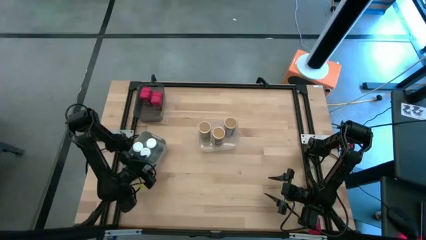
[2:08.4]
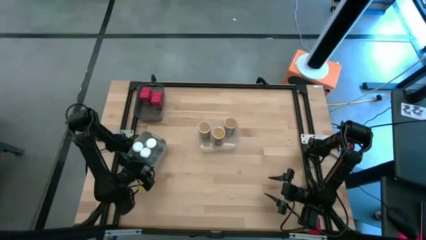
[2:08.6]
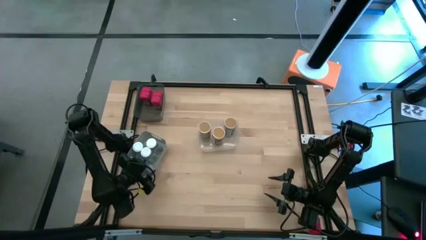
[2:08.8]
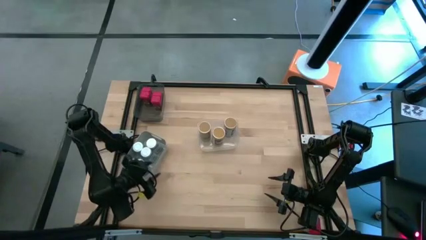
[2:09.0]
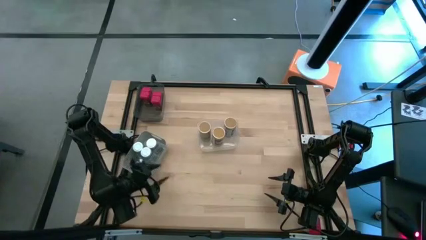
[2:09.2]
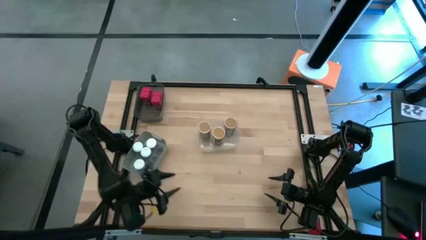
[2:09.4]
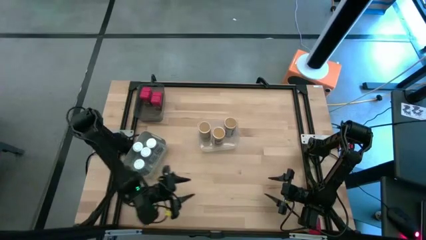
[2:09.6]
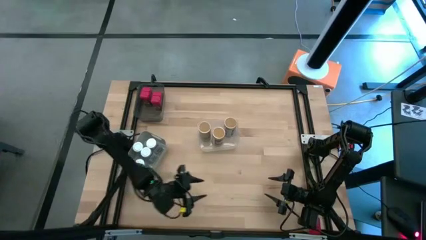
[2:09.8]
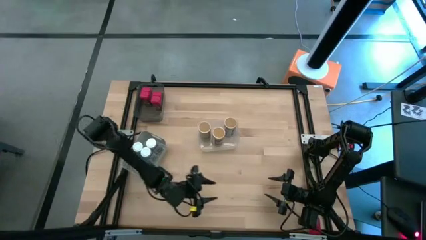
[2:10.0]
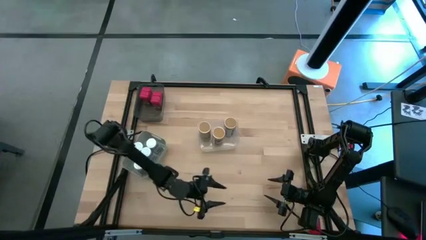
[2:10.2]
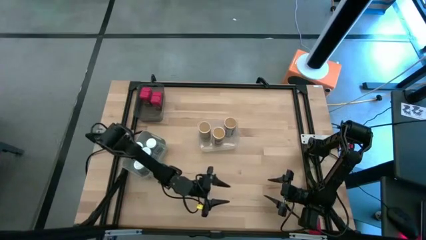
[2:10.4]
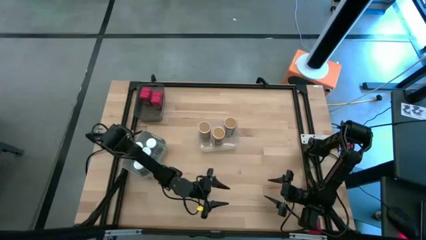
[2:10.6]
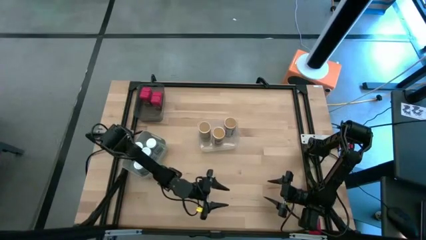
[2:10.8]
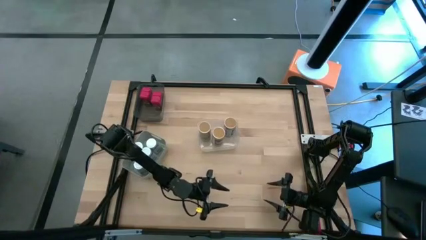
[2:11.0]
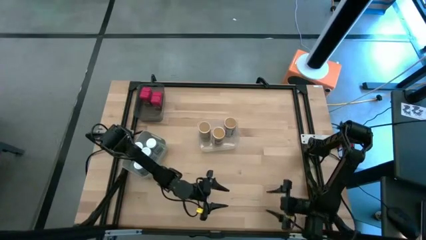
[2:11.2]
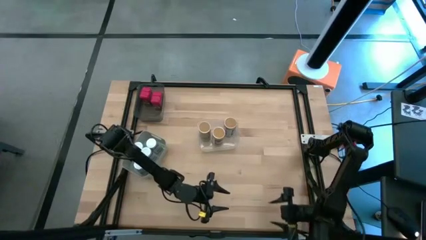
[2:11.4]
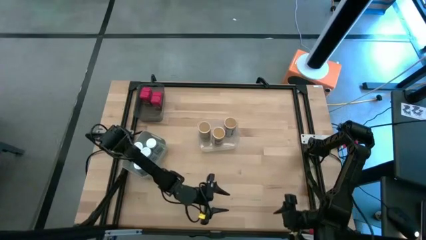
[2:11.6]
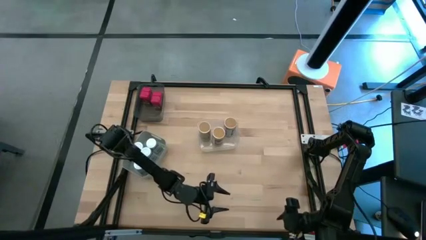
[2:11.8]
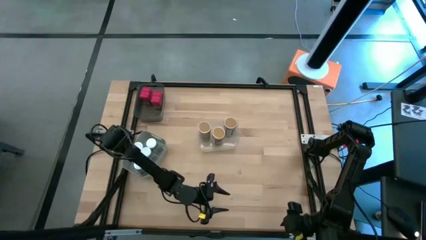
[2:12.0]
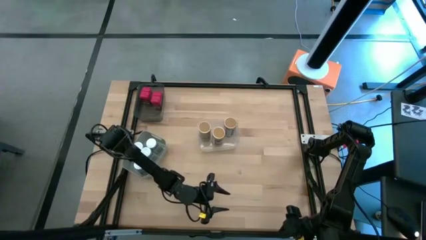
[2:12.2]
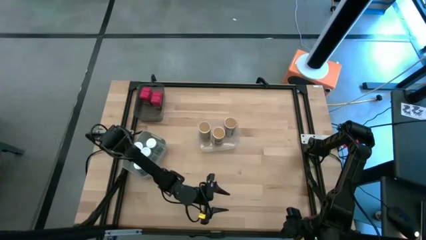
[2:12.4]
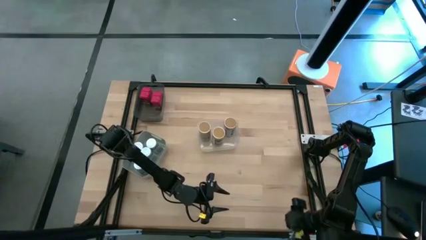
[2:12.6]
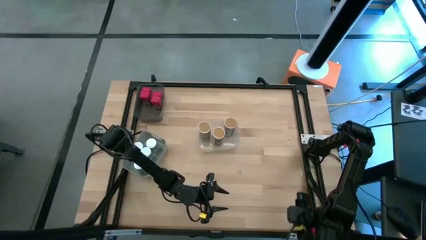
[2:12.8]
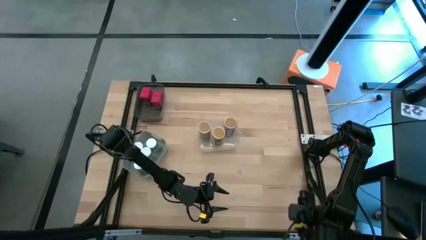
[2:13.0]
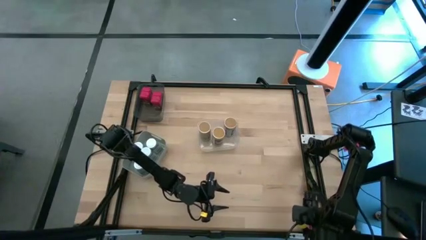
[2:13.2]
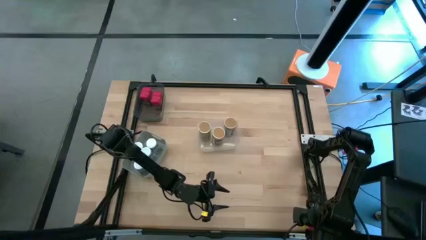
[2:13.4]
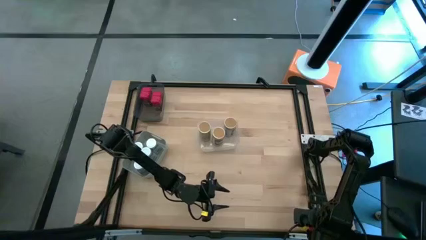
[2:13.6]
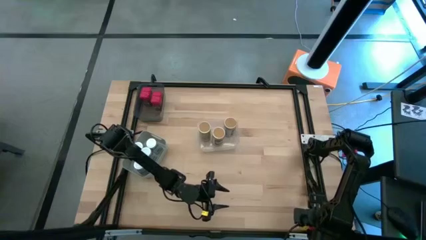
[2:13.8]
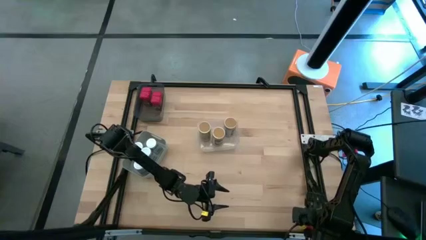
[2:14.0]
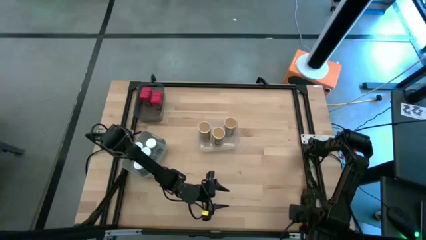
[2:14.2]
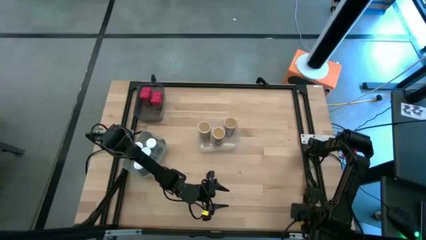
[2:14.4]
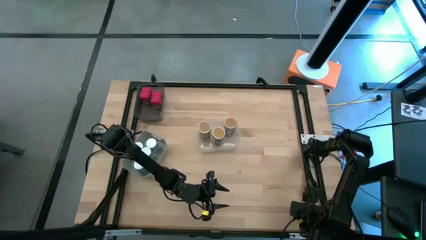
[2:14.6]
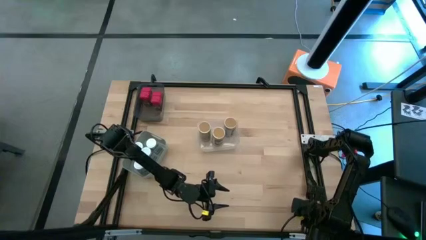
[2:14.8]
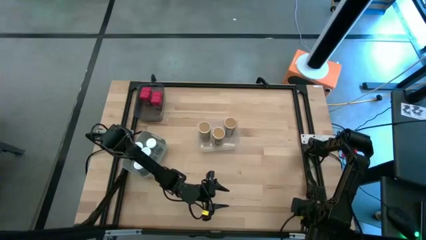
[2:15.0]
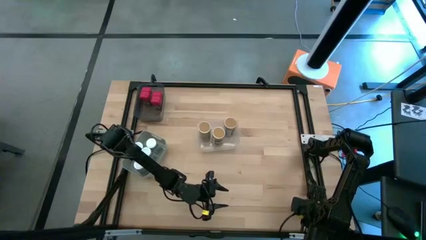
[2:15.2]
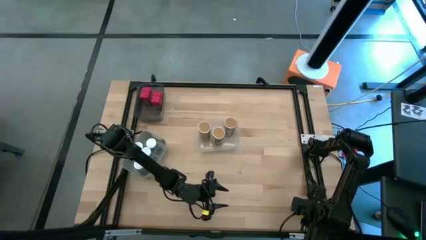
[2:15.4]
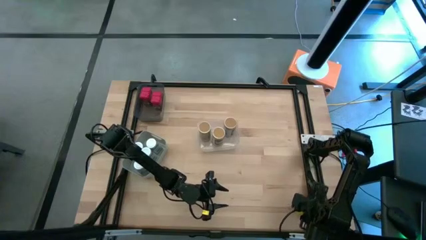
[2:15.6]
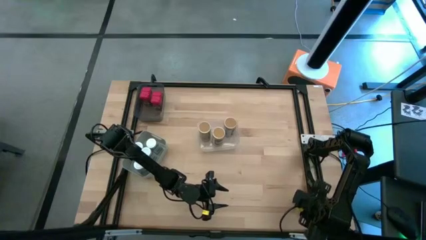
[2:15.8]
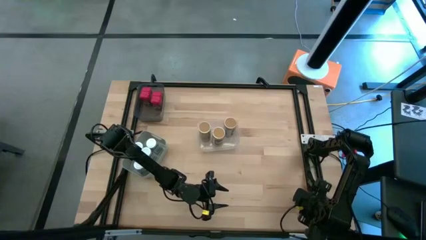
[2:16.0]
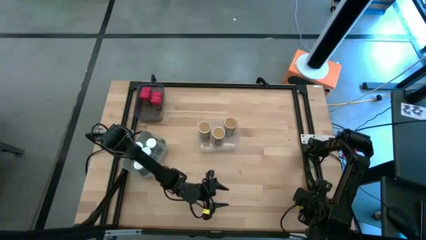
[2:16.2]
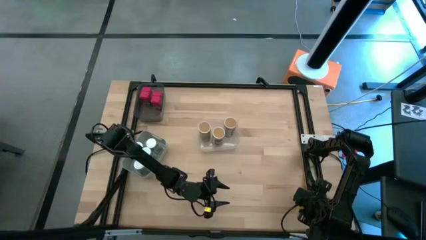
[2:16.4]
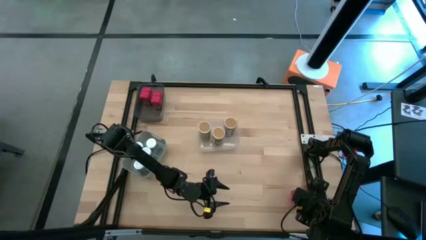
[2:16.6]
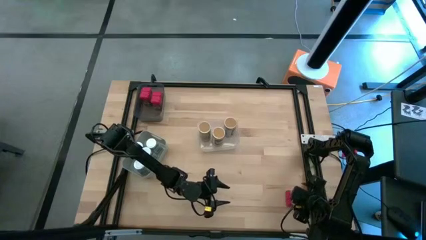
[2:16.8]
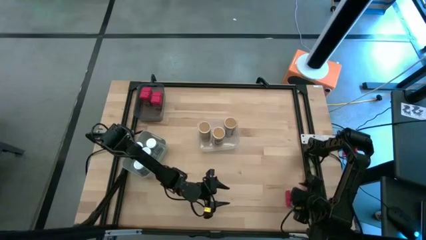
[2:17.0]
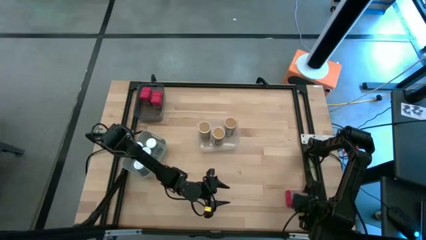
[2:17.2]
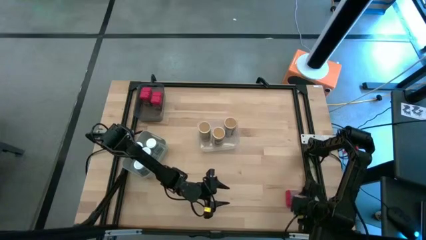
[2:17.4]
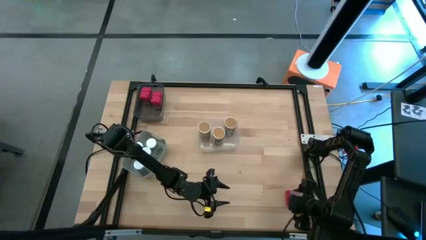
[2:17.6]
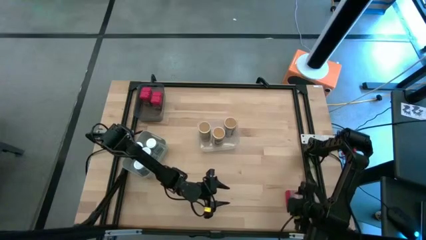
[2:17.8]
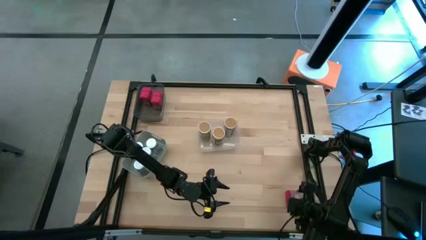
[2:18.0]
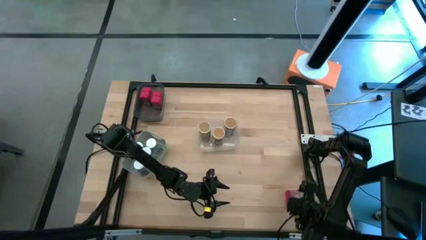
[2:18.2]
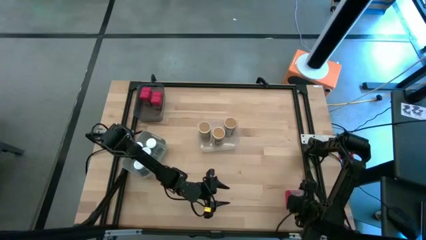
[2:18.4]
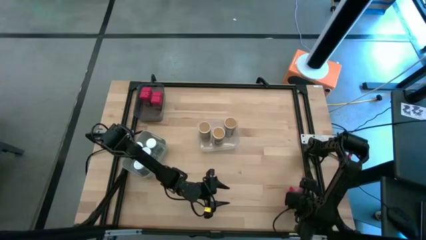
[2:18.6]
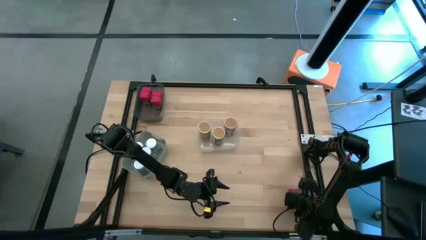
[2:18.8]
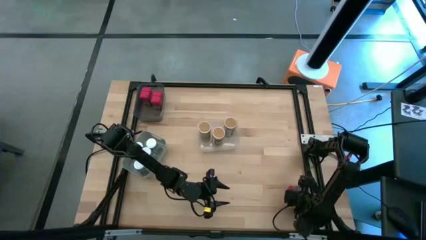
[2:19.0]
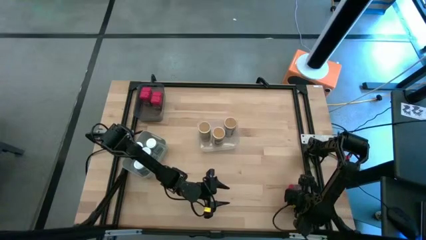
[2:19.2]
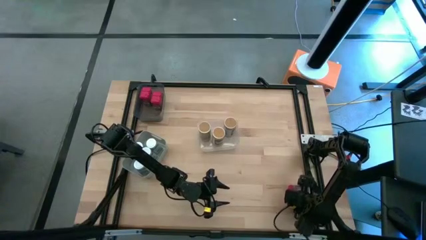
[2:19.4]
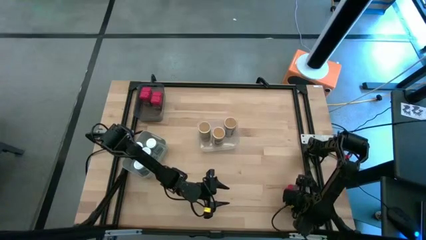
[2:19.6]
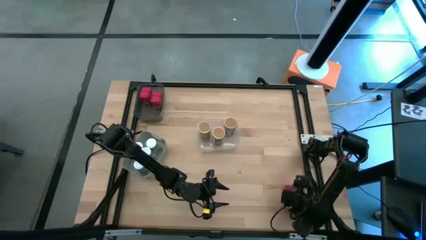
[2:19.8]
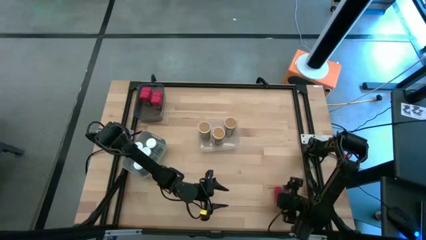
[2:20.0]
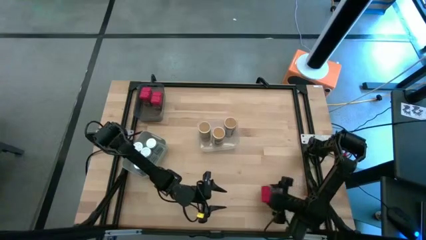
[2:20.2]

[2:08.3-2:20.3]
Task: Sort spices by type
Put the red seasoning can into the black bin

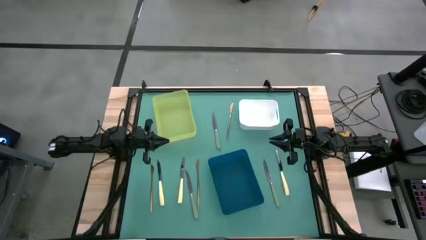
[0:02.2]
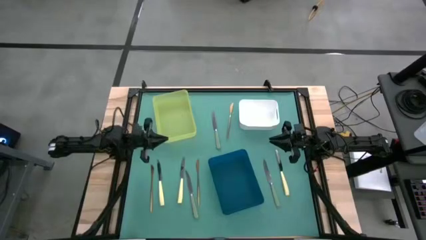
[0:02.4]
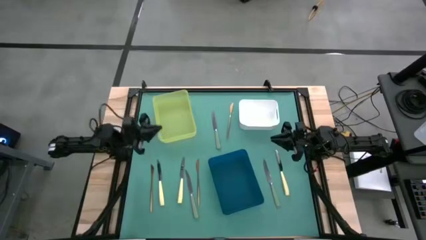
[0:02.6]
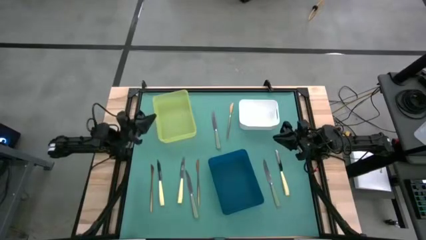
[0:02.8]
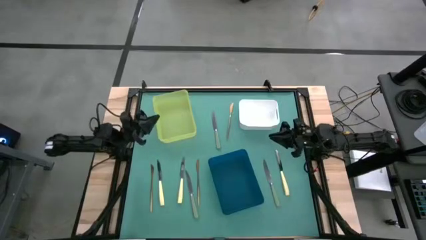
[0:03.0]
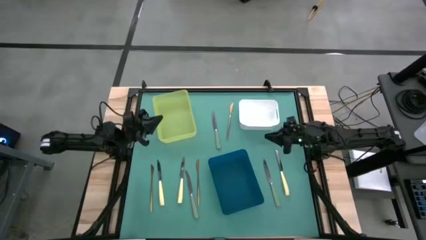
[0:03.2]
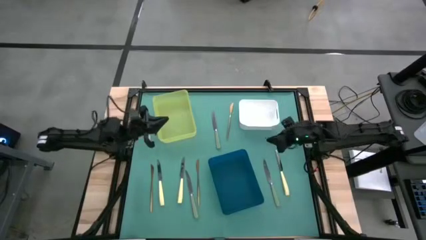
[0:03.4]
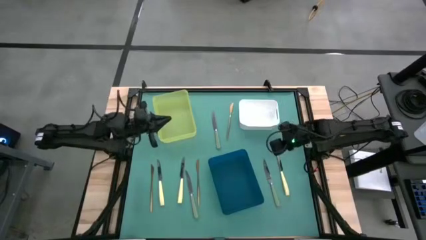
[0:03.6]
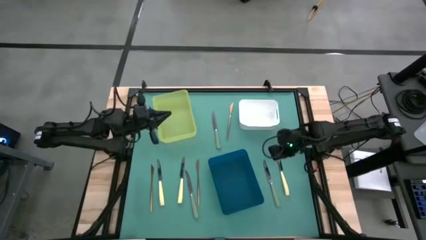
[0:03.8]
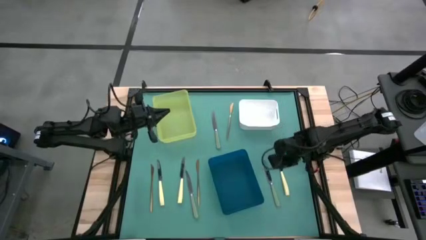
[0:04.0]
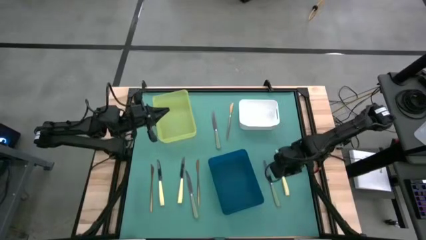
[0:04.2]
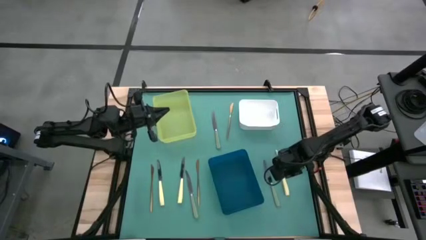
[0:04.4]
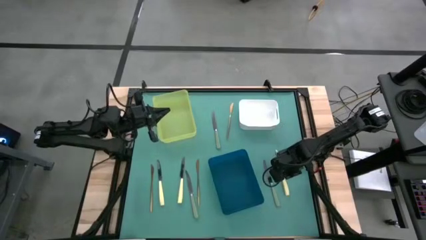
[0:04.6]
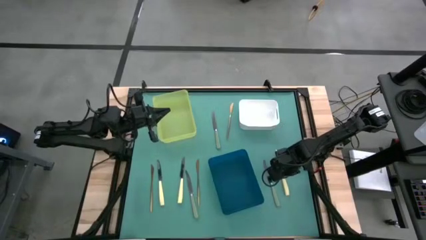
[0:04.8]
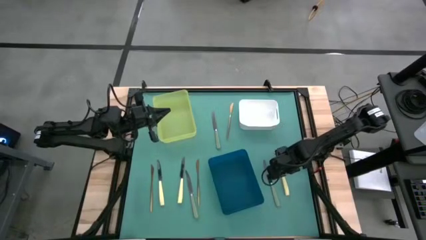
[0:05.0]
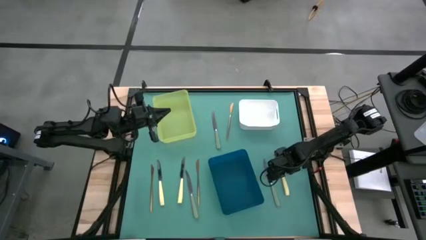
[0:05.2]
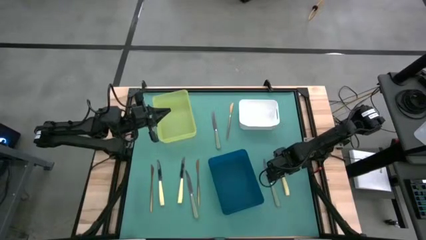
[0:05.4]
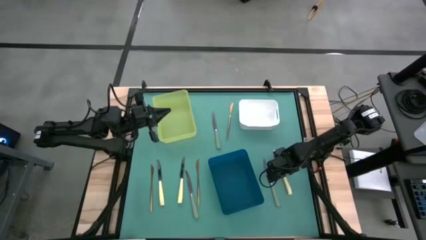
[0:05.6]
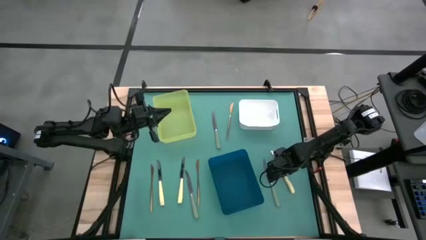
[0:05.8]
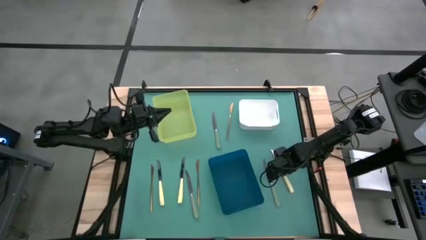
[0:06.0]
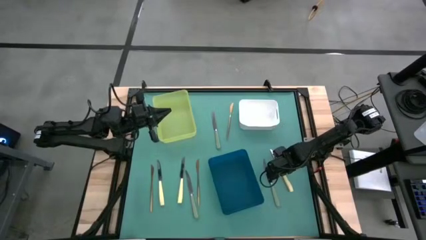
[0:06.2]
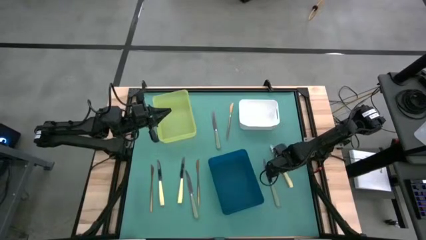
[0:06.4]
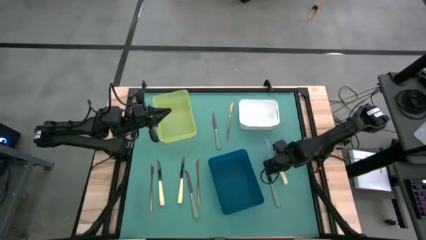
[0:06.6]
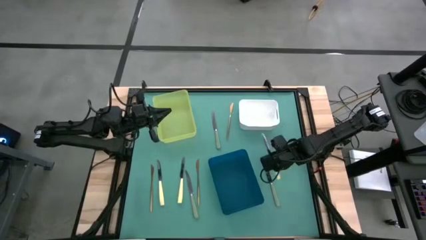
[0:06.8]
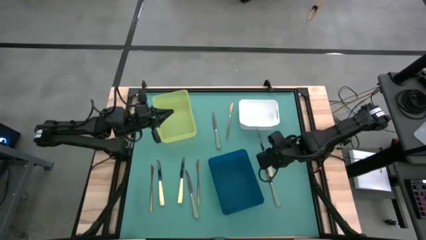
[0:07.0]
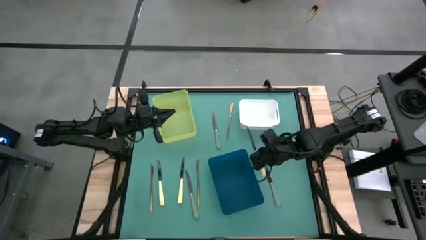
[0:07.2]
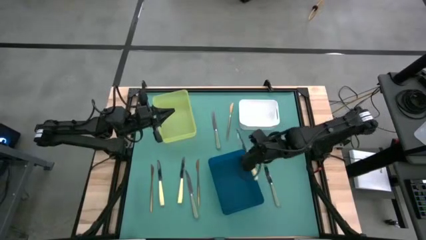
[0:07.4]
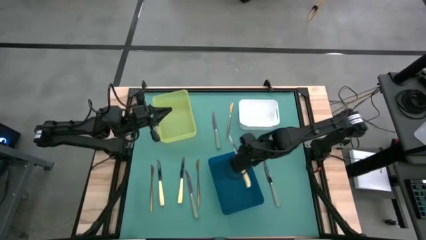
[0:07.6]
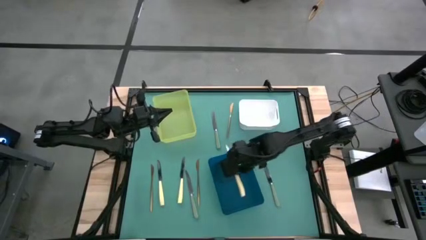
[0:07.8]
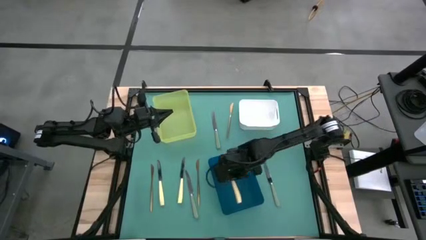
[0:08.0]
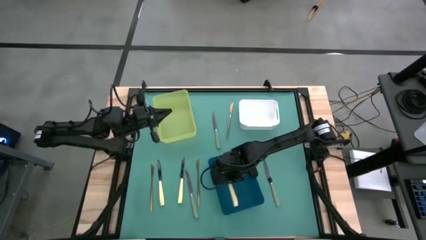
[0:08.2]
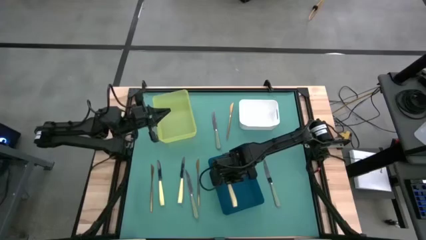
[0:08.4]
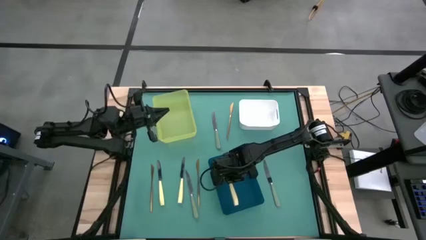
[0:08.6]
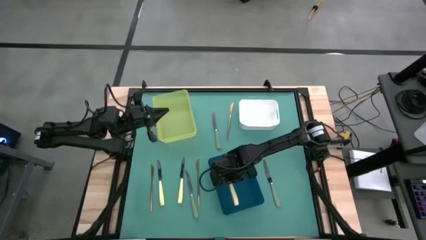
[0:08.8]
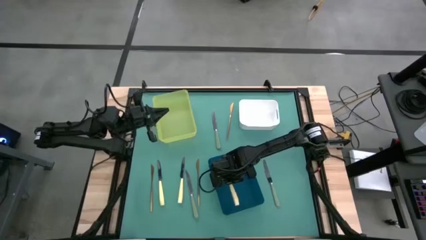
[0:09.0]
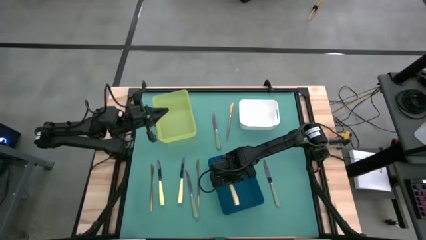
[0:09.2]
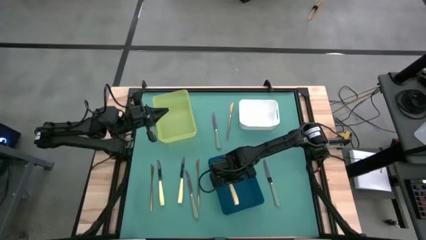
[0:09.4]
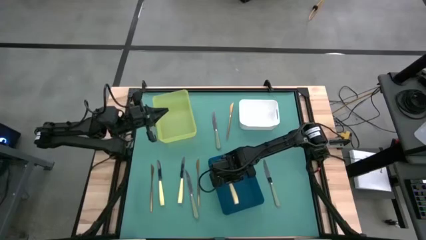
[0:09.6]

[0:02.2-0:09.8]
Task: Sort silverware by color (type)
Put the right yellow knife into the blue bin
